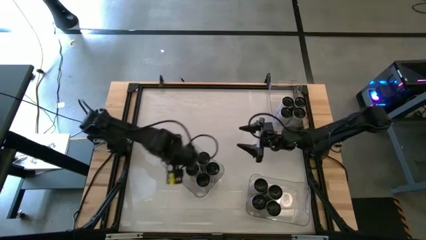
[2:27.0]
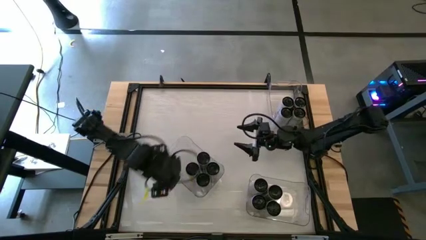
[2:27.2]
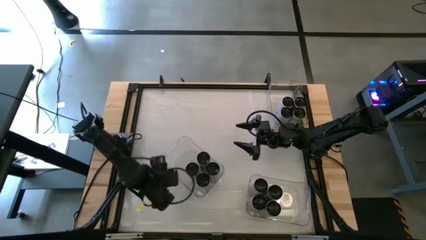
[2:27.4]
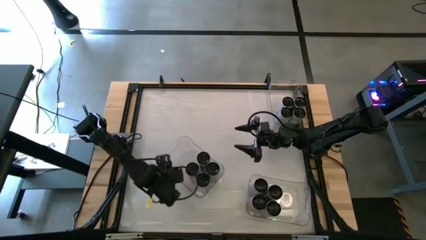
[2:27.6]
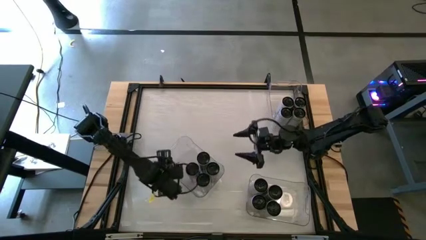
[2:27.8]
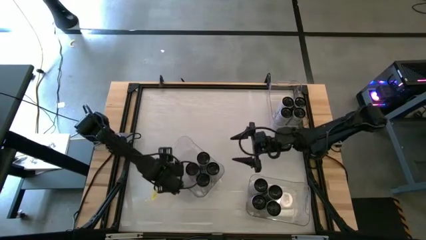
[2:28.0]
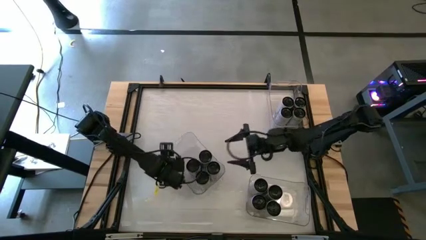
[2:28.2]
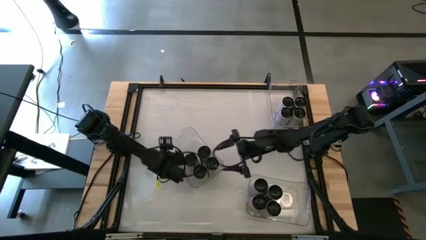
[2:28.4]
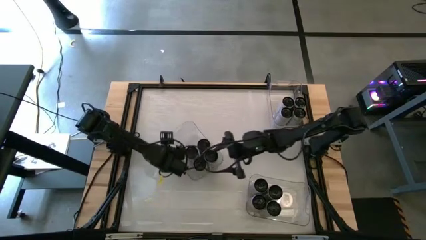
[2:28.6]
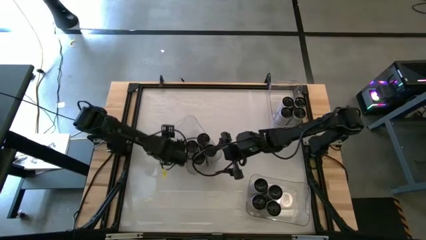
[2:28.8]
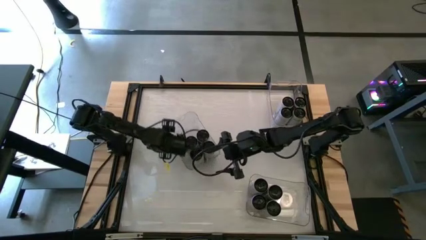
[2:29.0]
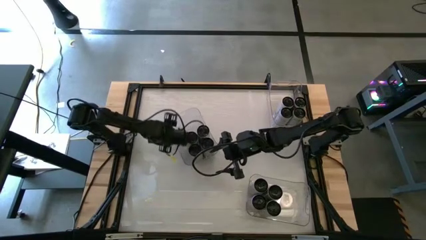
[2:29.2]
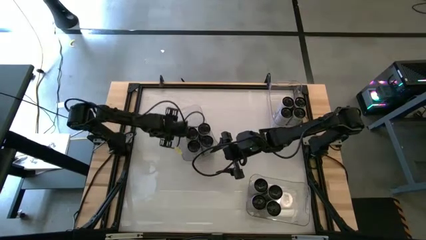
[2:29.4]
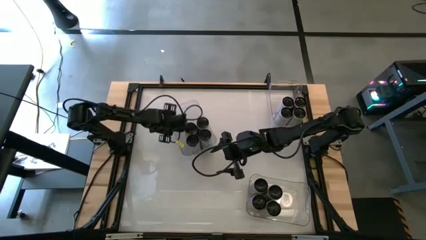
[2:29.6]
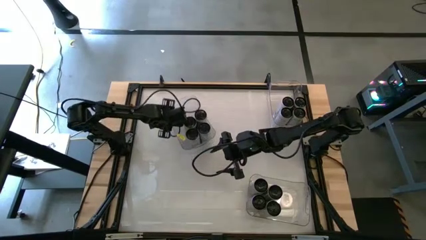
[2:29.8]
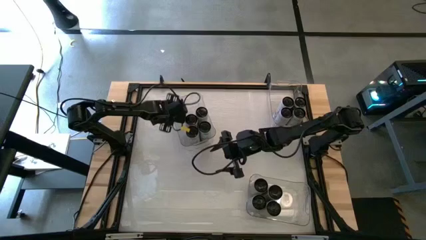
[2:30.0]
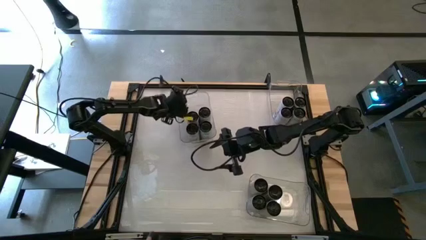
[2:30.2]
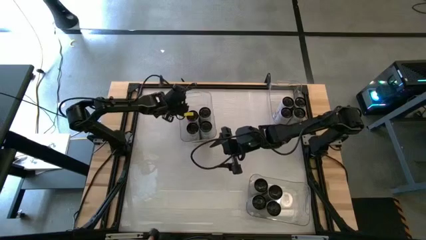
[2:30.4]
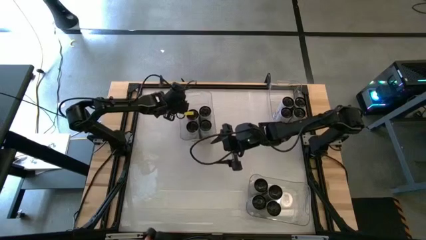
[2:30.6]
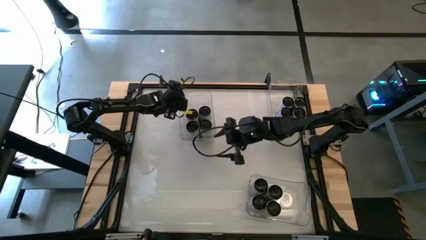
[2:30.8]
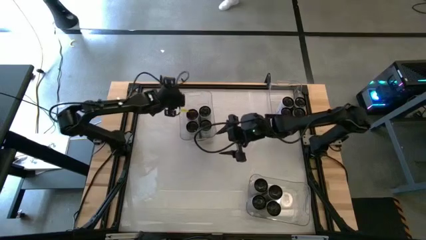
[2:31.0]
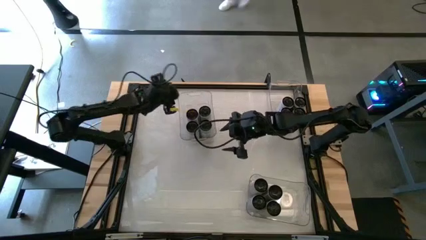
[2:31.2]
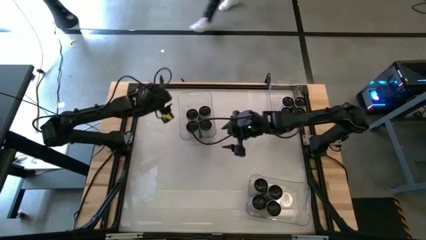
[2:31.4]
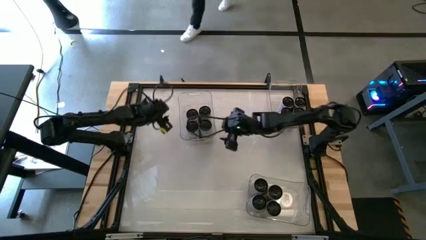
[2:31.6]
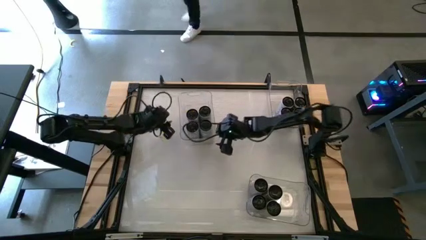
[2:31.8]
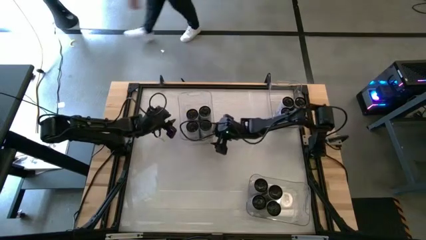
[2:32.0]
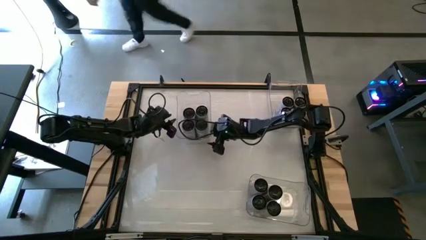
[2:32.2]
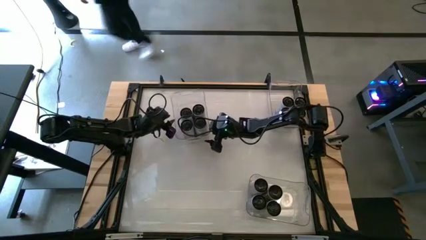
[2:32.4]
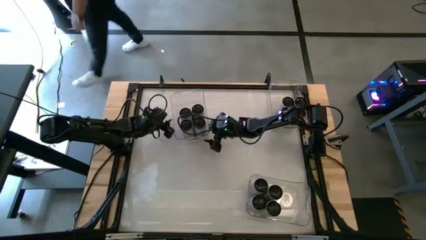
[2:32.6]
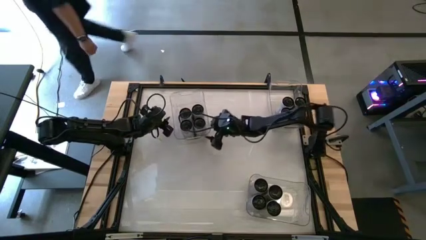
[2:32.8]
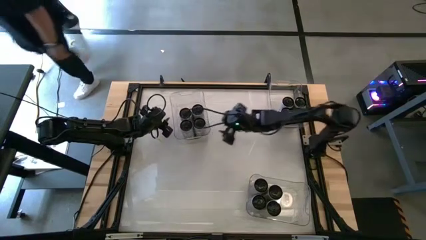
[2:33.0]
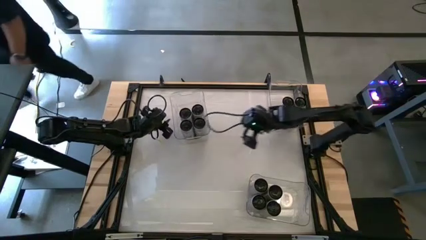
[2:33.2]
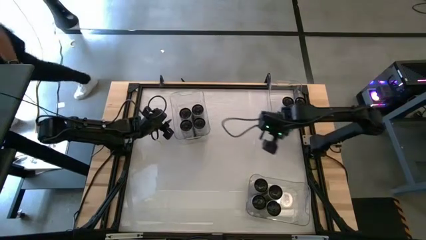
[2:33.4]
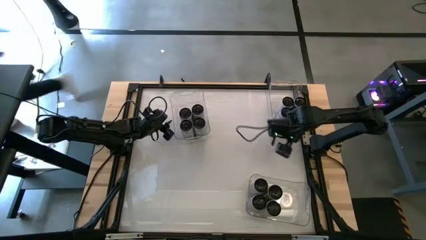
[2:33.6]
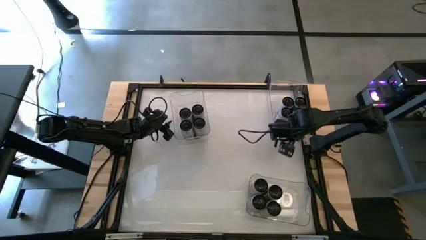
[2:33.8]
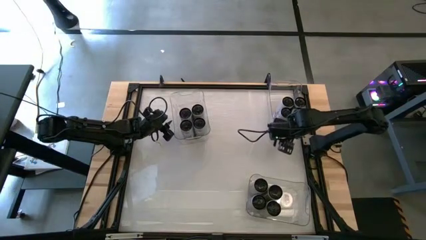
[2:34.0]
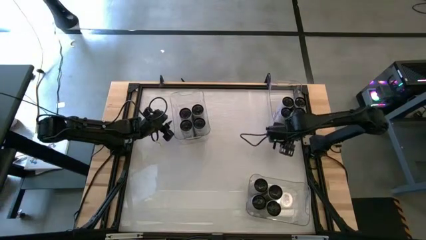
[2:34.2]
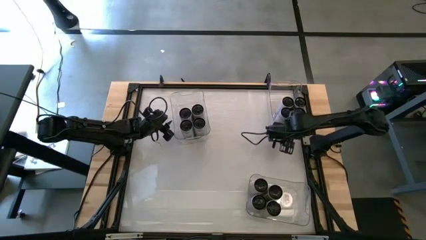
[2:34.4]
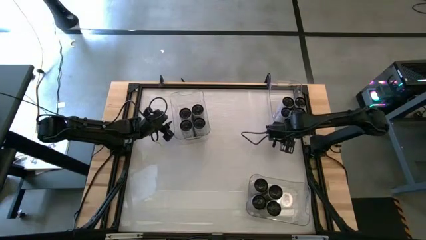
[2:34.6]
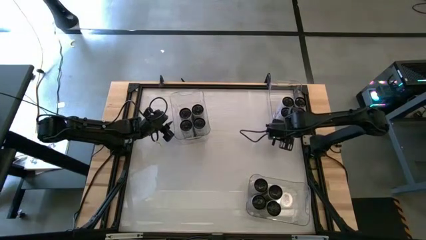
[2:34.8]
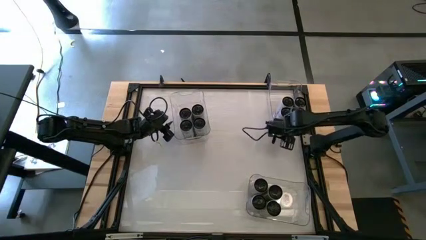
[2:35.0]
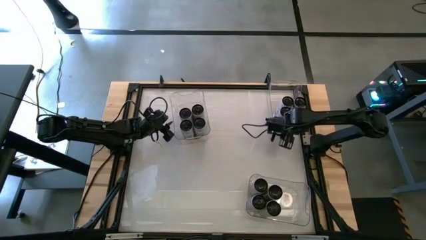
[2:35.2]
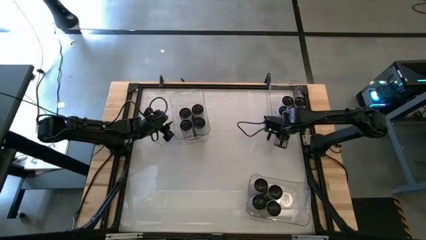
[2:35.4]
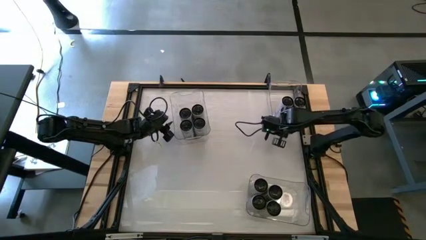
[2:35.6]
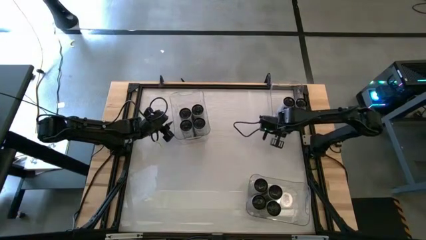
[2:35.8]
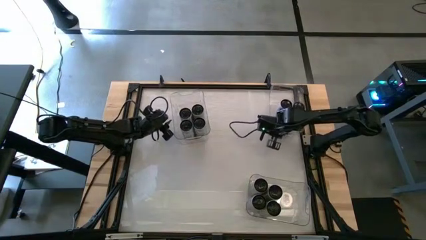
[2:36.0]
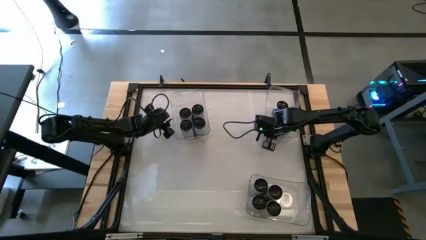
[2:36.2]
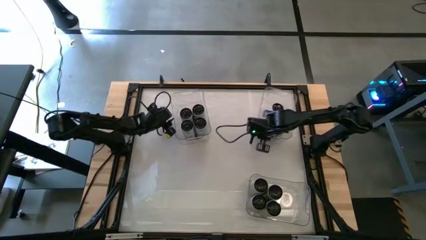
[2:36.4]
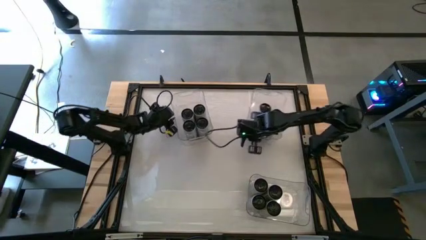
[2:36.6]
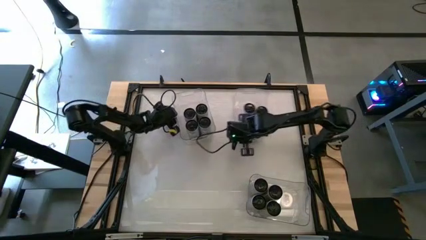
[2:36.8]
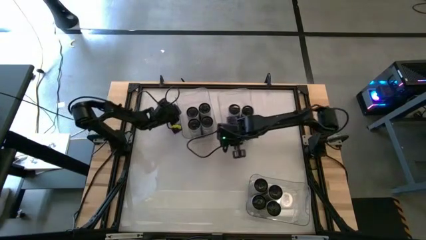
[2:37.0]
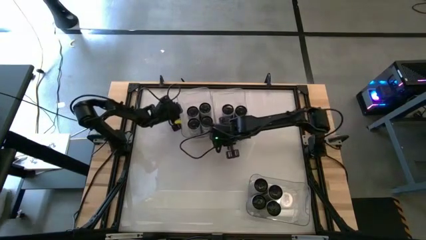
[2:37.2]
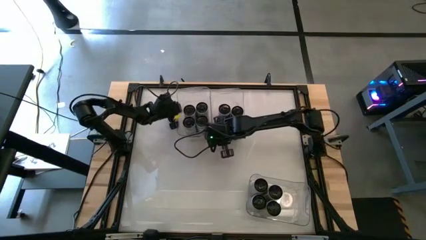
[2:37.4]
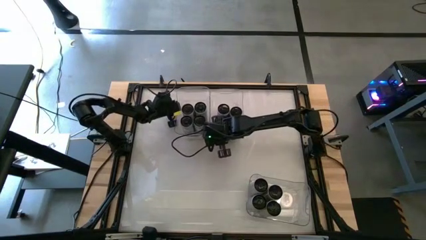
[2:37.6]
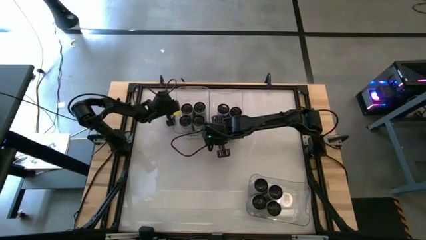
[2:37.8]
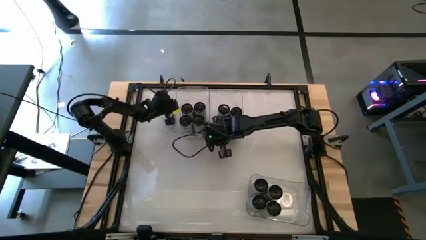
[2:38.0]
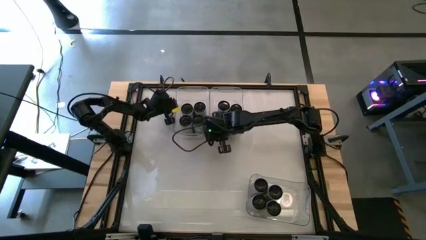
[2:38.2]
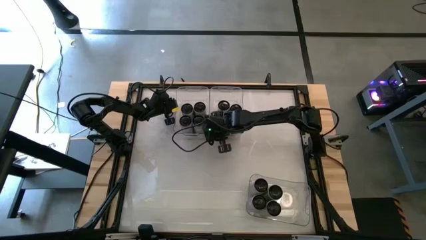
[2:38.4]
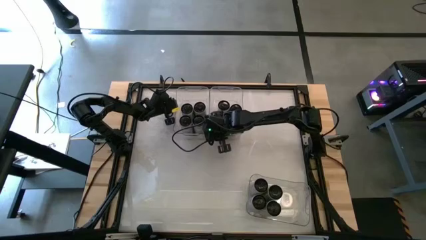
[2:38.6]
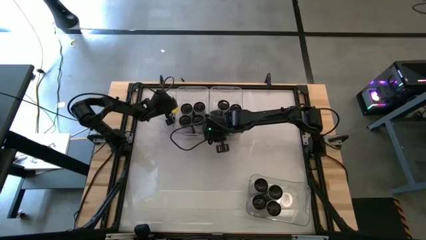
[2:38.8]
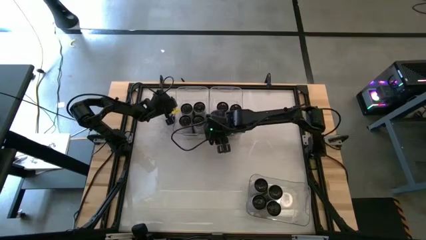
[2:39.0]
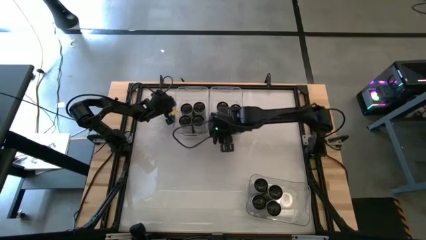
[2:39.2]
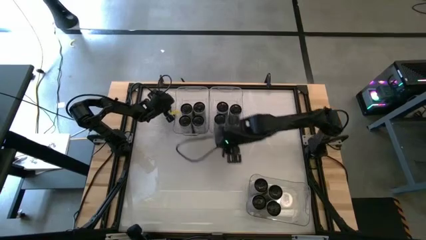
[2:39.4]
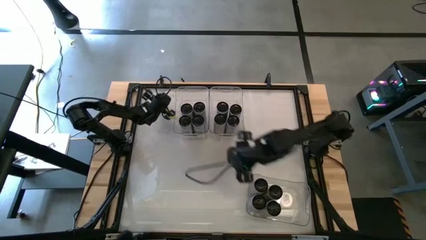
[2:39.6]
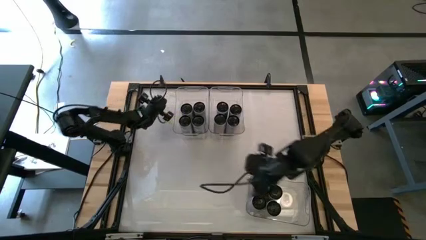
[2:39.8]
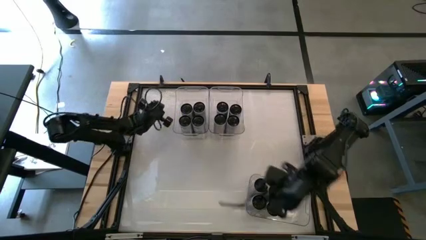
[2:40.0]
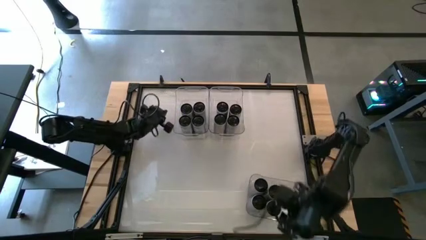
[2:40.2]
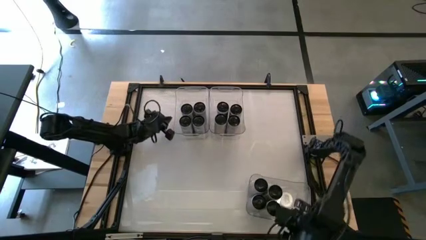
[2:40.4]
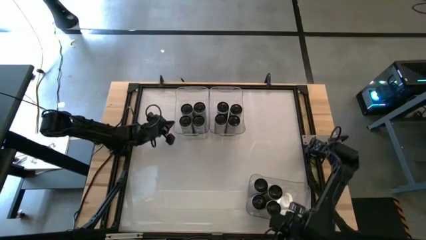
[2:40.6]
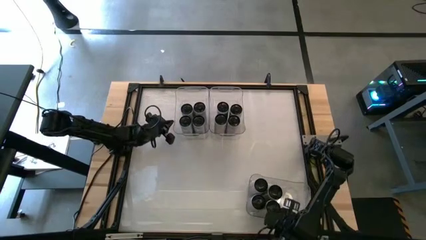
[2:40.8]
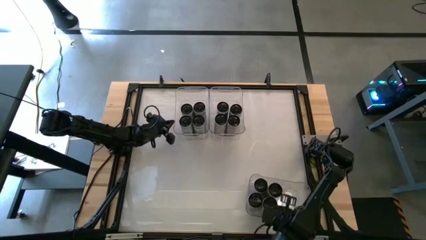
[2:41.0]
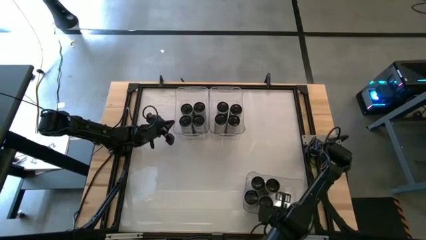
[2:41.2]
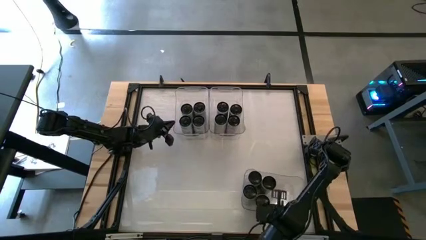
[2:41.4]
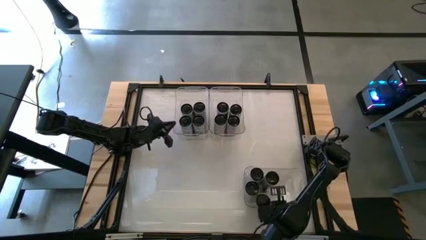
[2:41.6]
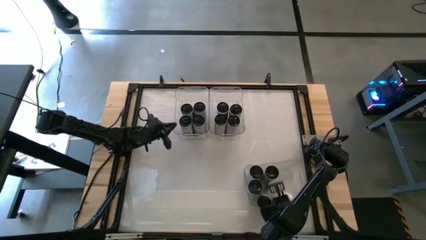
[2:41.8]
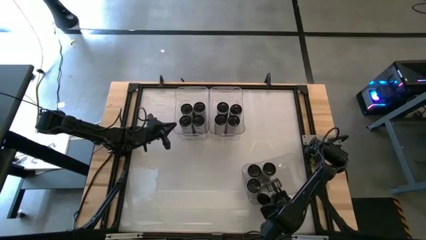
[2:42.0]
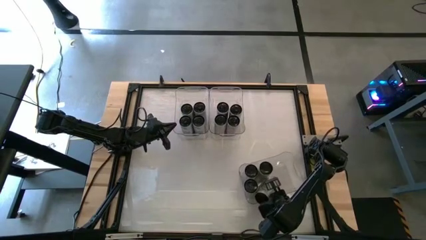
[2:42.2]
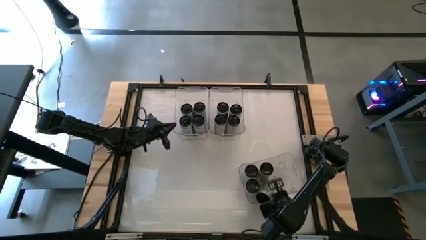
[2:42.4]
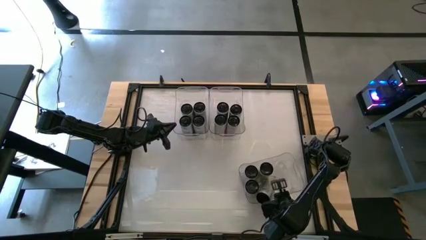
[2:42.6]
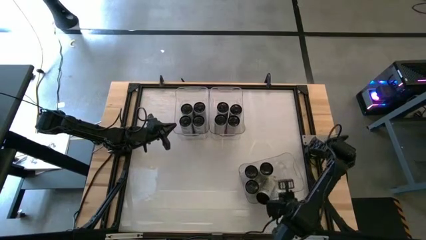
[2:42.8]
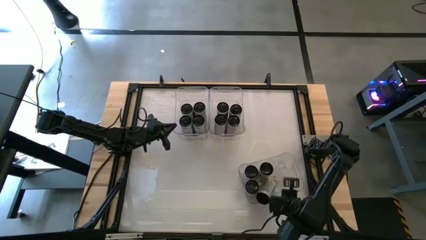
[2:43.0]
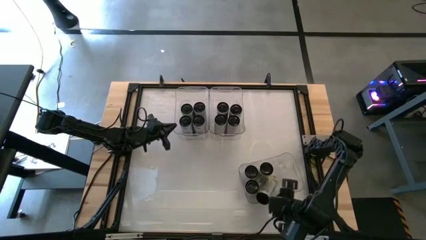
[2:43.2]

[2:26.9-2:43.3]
Task: Sort soda cans
Move the transparent bins to the top center of the table
